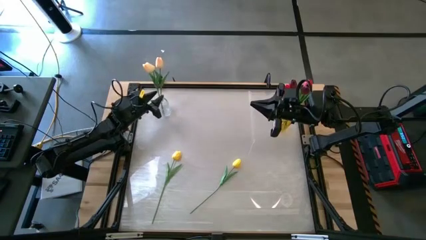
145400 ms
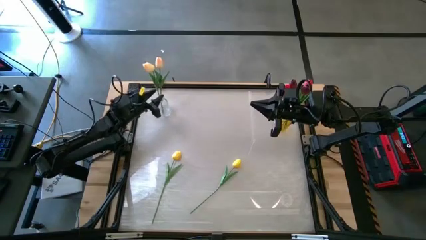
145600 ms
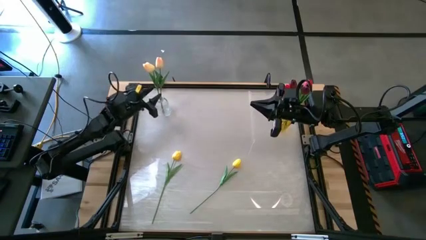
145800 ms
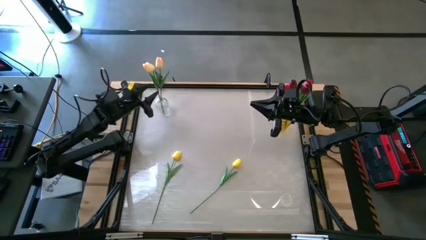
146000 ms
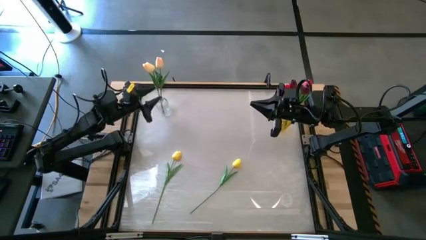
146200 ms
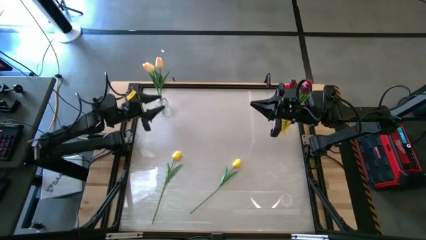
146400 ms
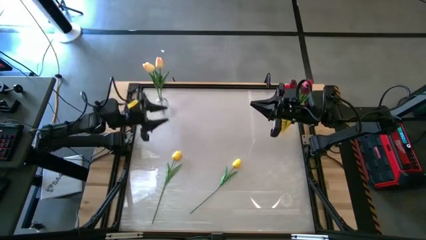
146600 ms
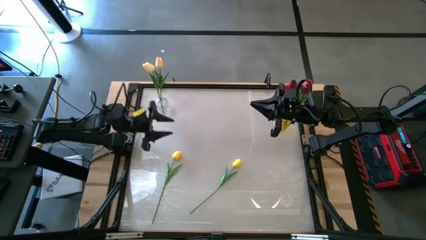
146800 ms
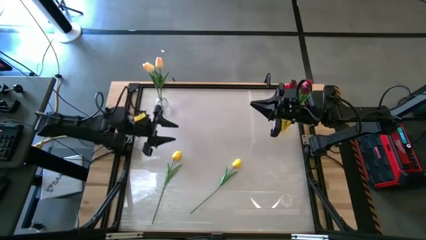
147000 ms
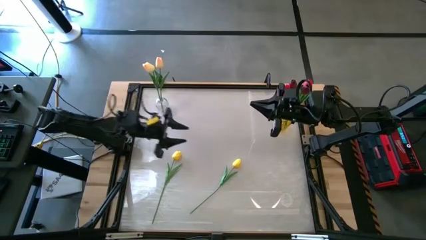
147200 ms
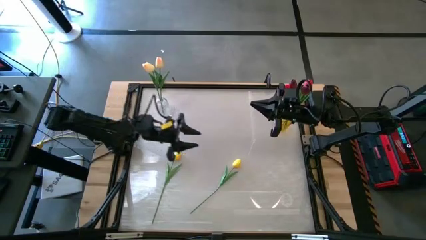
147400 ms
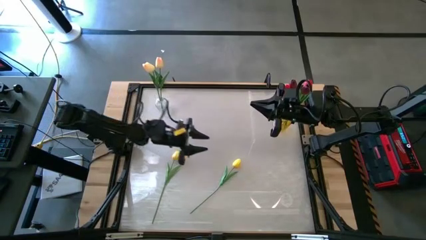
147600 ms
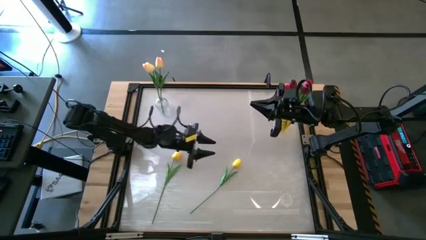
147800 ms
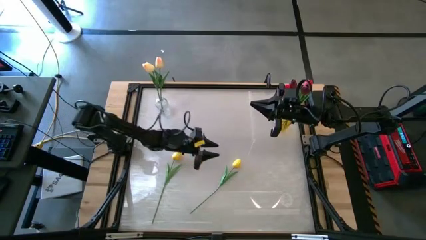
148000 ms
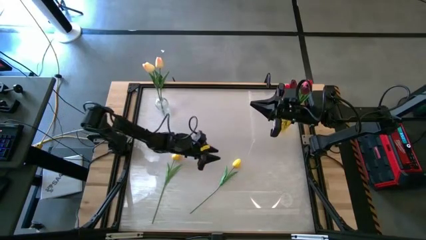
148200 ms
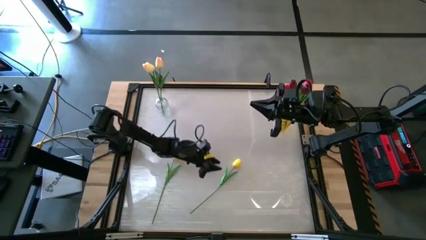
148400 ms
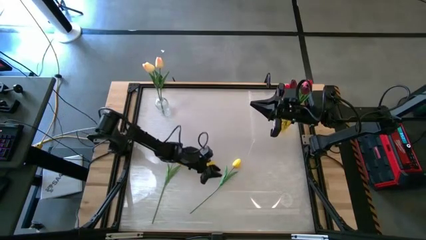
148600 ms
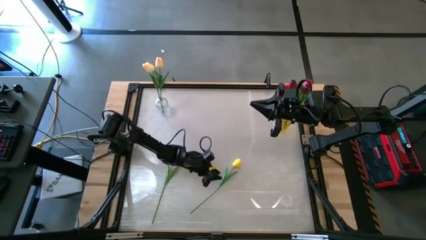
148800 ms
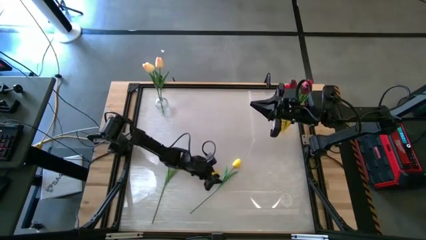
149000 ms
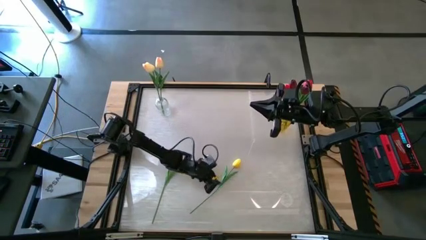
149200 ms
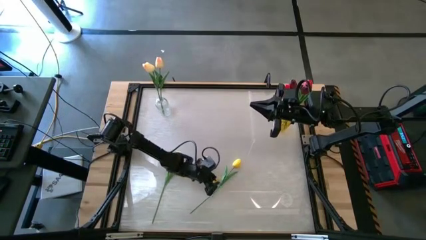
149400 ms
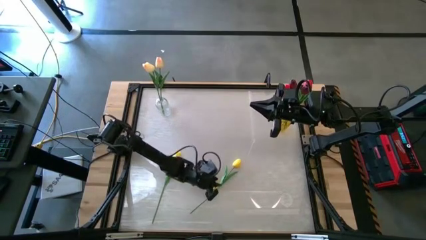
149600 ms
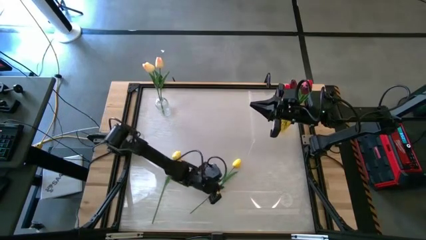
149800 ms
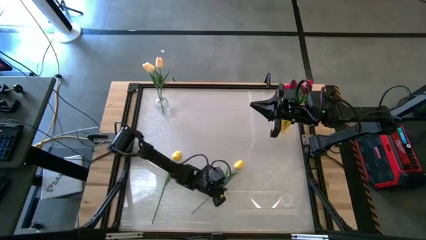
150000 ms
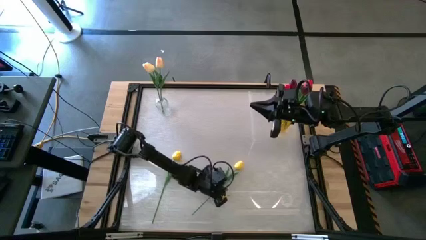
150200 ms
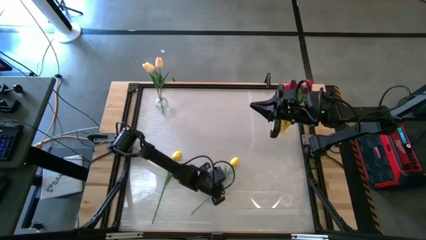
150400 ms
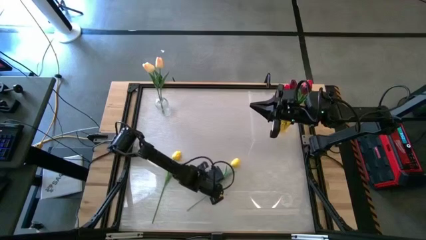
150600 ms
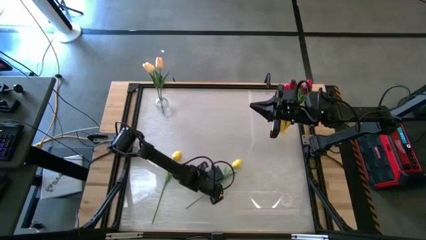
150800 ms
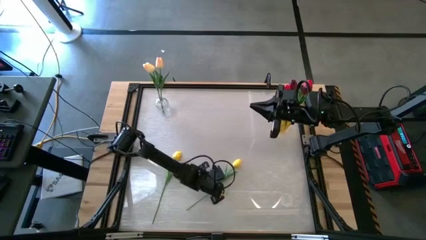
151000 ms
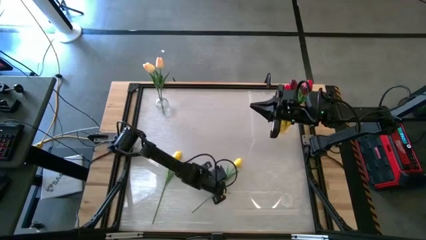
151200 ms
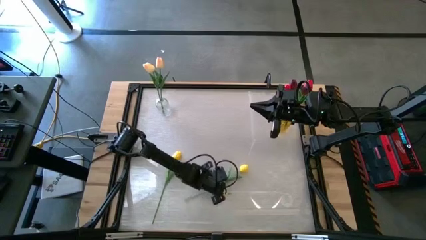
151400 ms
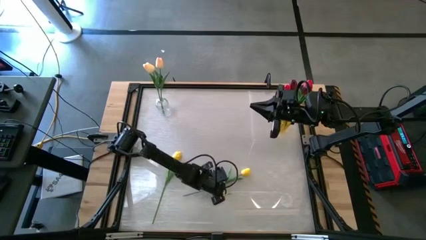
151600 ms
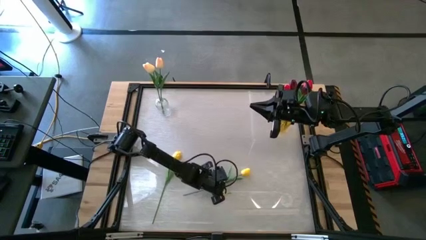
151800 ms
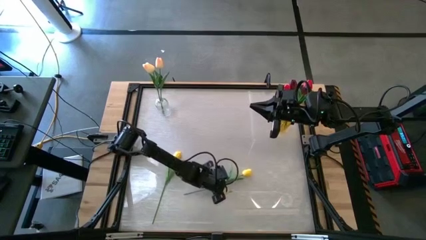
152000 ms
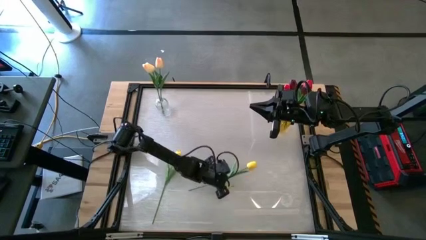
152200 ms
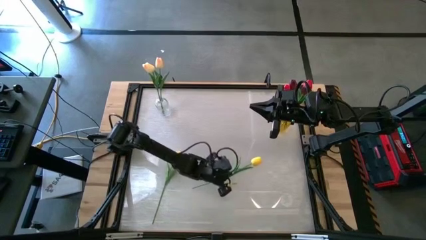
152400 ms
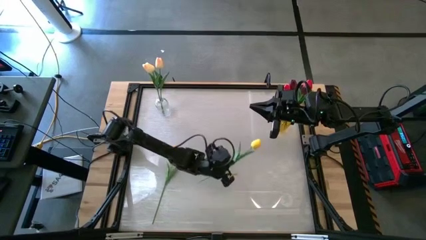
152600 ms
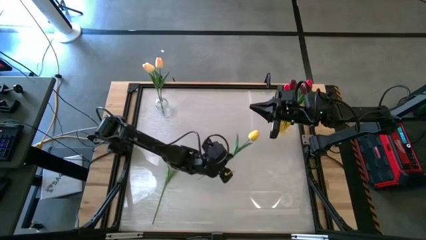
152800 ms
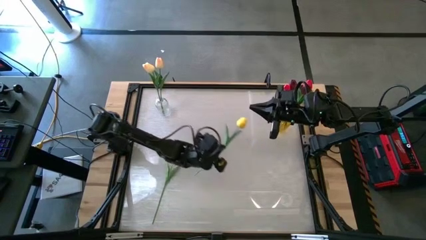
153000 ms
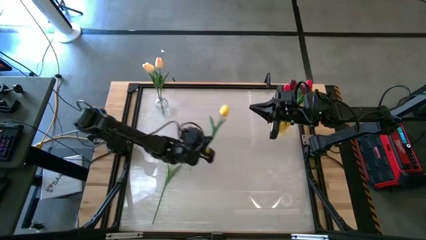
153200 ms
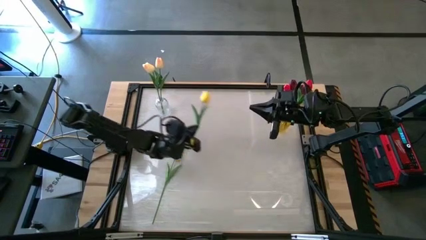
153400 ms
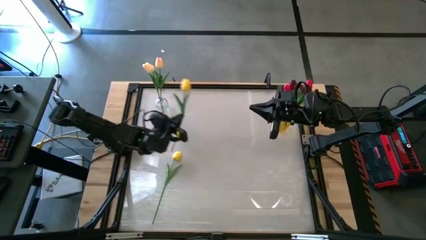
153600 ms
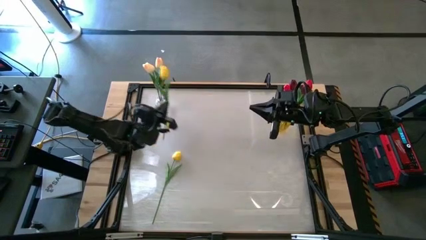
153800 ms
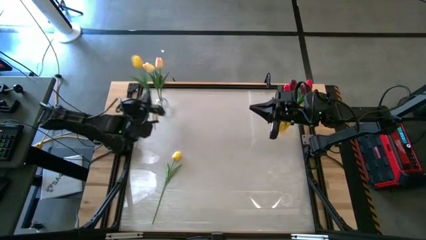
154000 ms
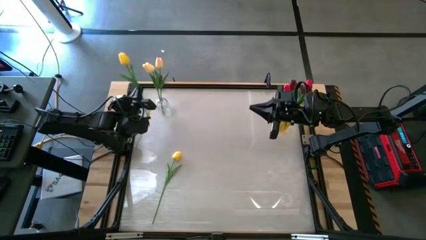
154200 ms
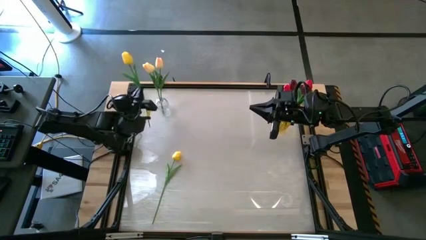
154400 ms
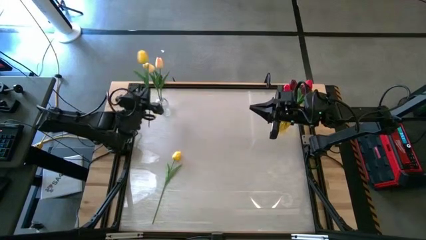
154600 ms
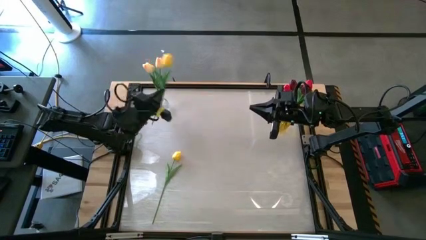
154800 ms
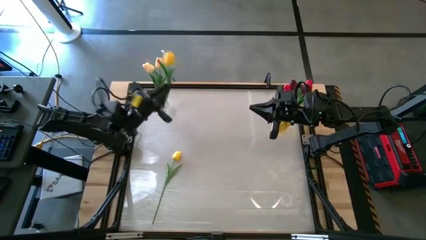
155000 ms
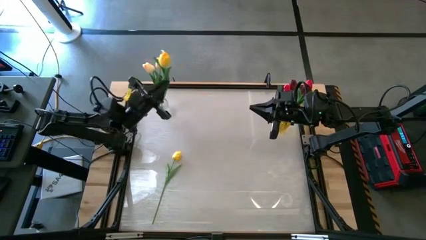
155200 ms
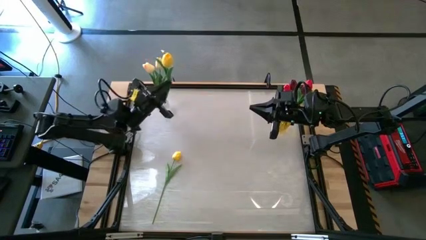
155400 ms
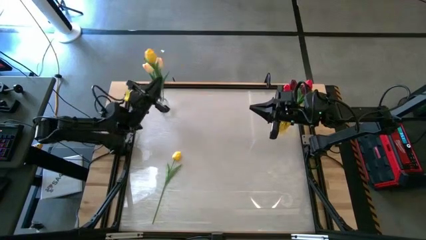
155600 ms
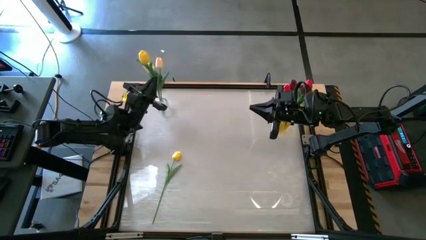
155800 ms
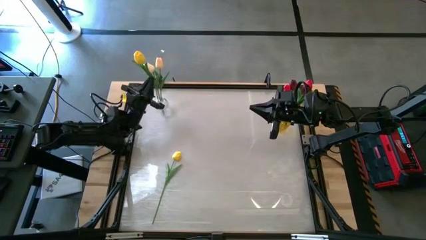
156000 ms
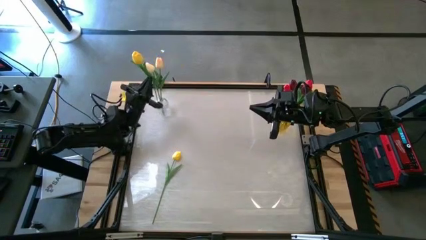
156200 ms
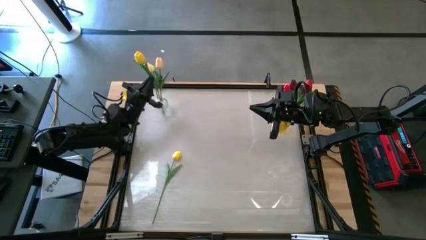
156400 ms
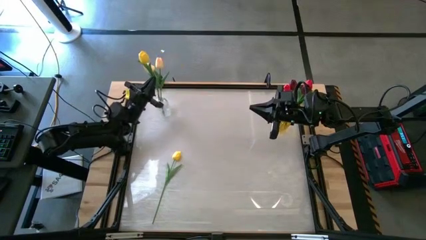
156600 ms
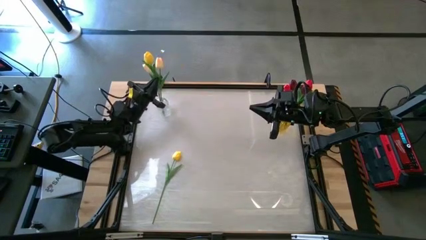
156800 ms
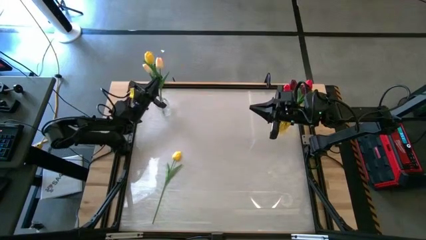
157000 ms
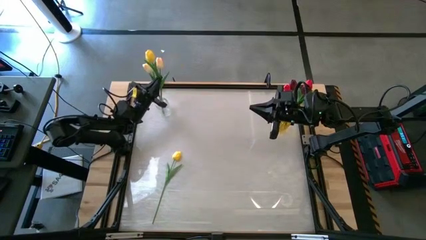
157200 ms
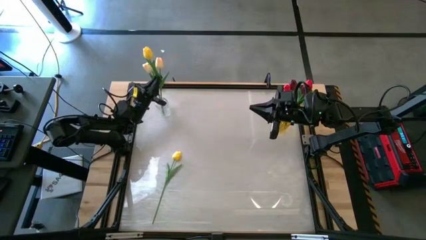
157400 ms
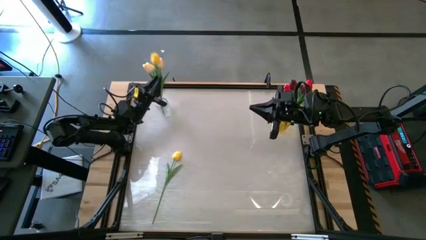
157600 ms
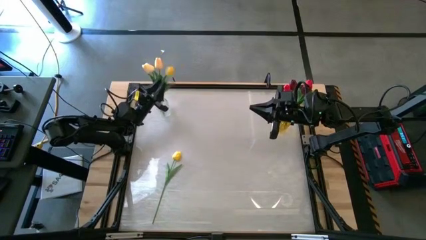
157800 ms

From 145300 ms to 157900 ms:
Task: Sort flowers into vase by color
Put the right yellow tulip into the transparent vase

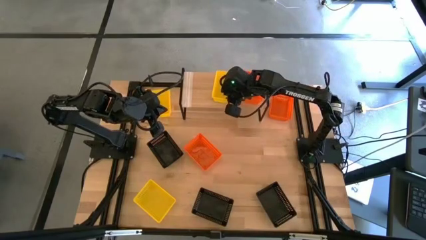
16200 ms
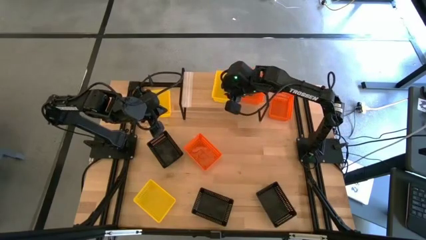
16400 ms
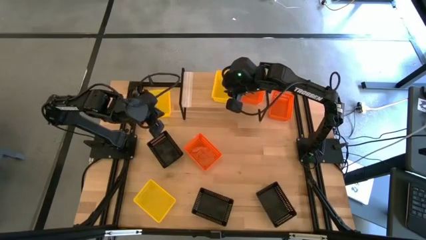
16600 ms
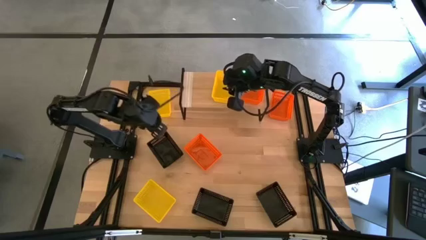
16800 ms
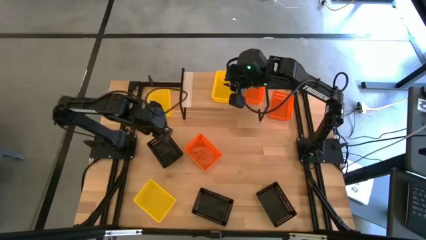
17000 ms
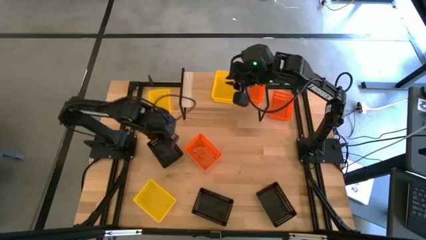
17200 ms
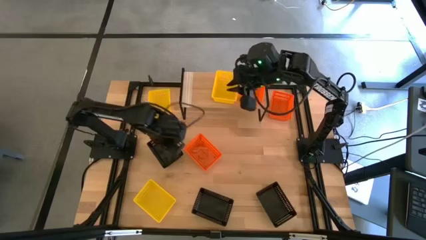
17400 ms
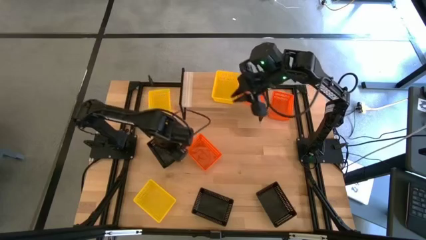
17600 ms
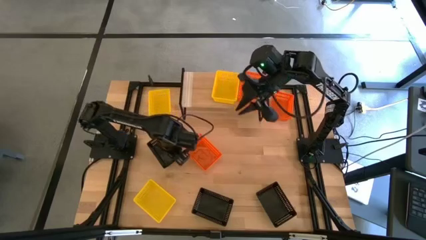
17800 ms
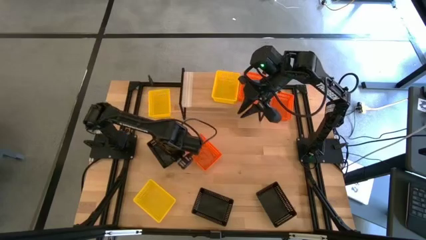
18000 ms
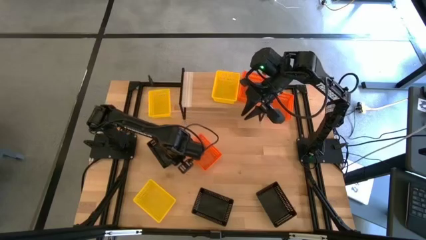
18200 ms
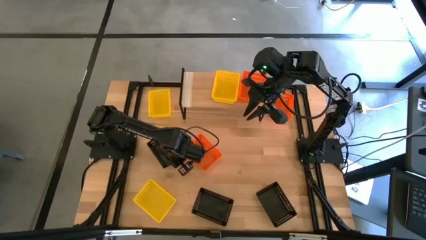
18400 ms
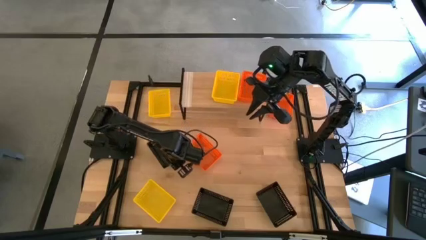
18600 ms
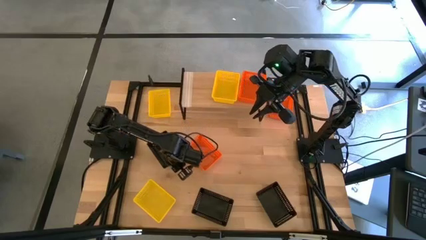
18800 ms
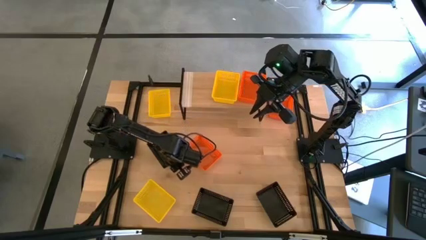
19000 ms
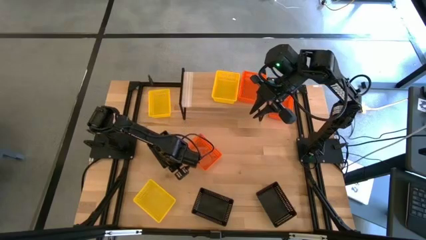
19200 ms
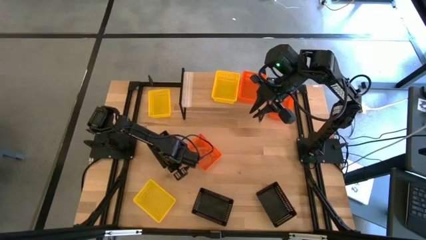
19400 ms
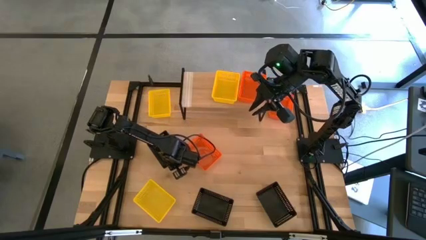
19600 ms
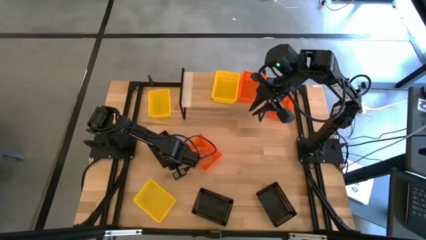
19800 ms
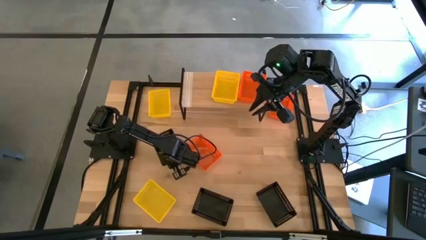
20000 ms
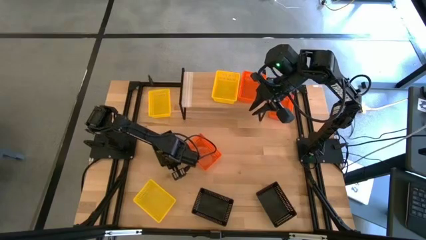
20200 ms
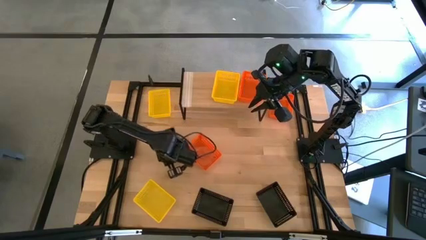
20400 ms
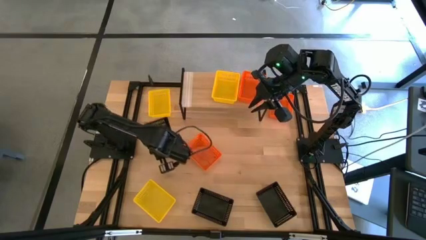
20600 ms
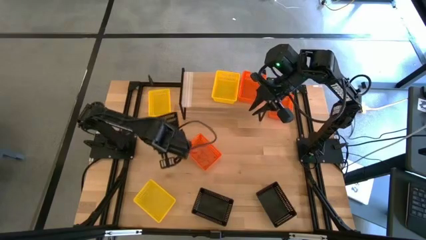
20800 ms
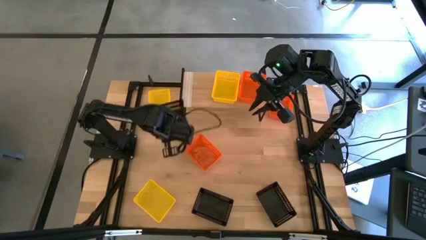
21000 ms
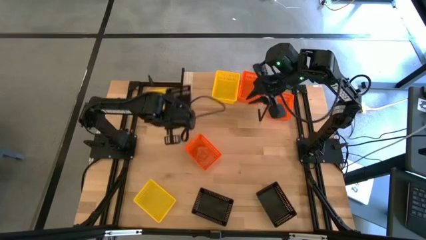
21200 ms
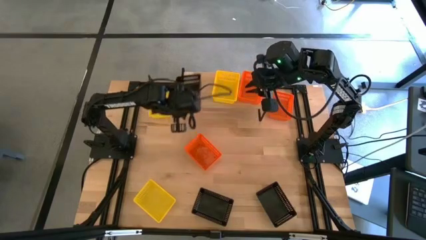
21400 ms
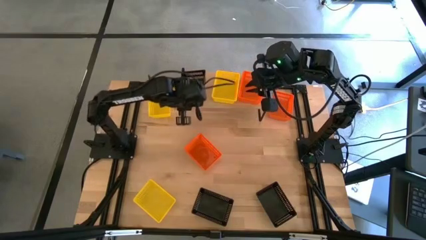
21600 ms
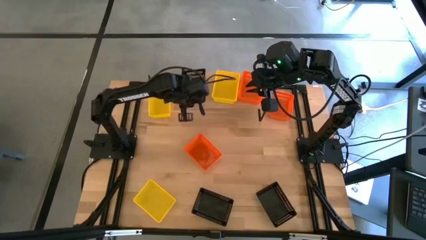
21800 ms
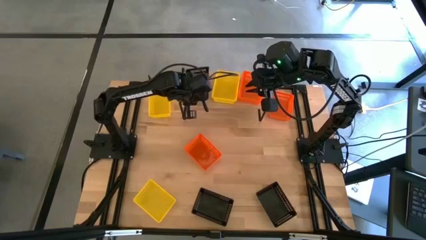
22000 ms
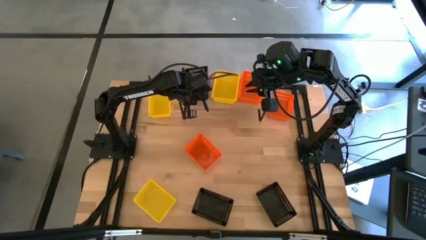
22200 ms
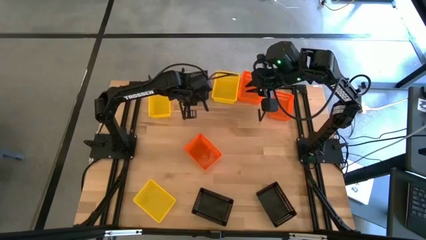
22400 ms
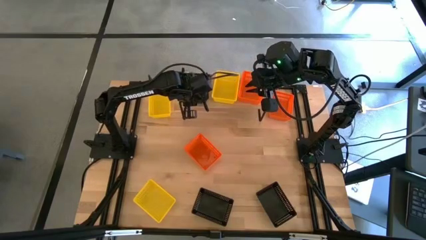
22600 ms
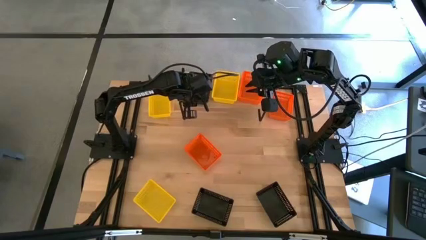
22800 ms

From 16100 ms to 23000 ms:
Task: Stack baskets on shelf by color
Put the top left black basket on the shelf
